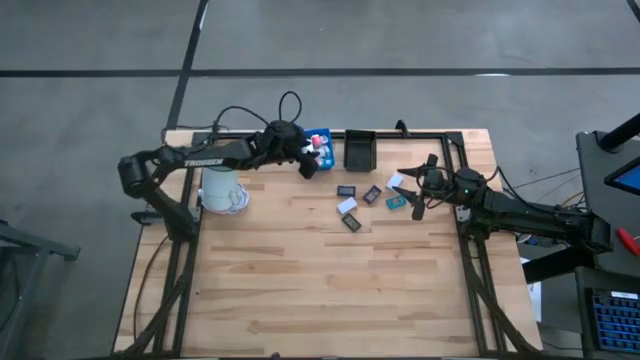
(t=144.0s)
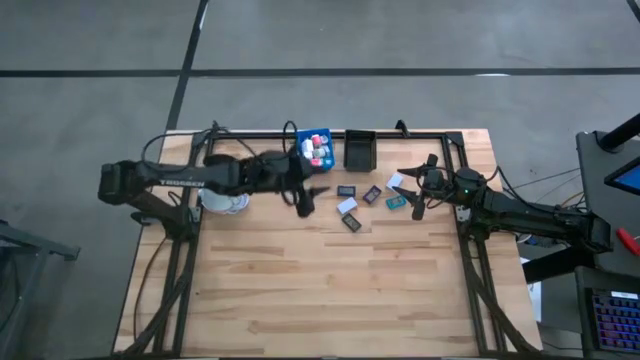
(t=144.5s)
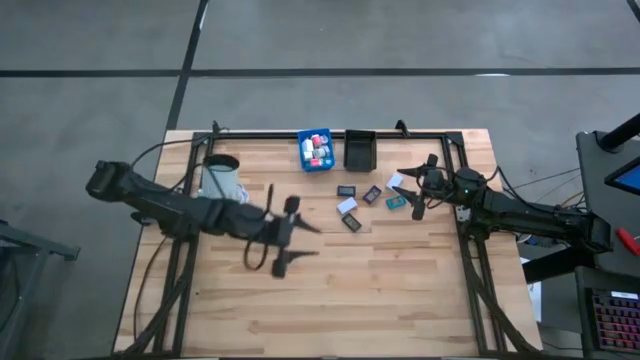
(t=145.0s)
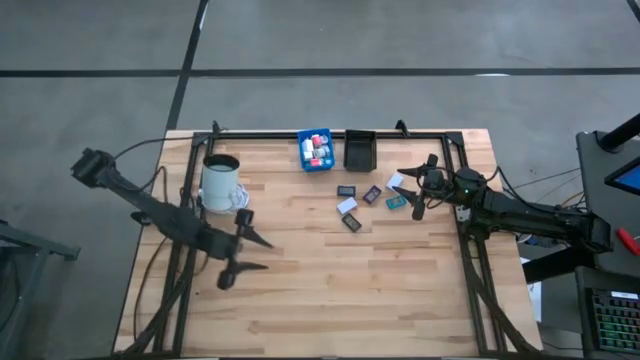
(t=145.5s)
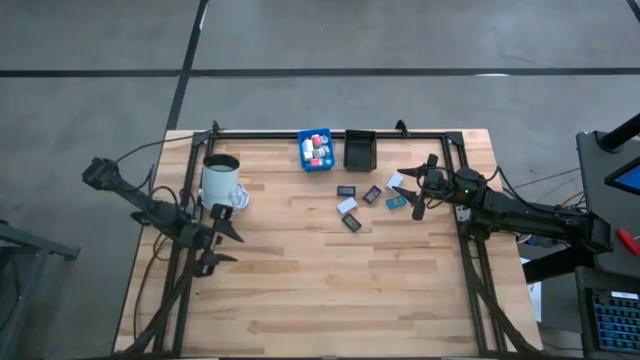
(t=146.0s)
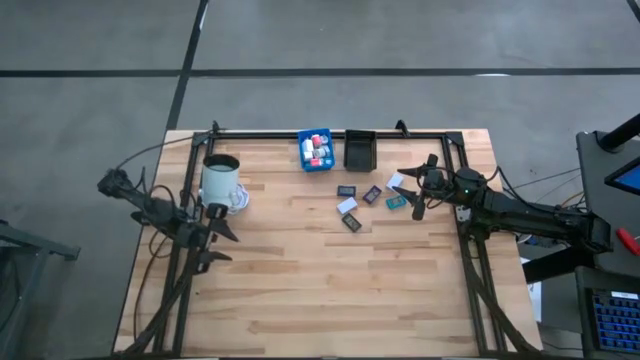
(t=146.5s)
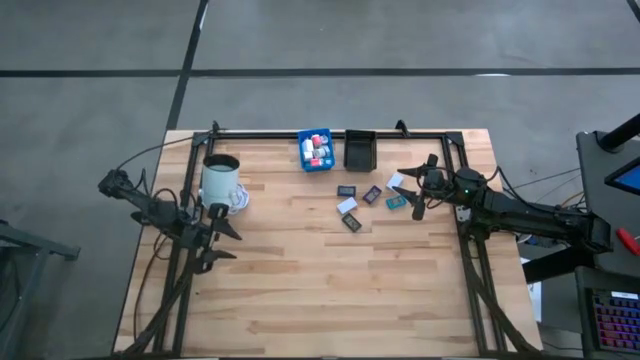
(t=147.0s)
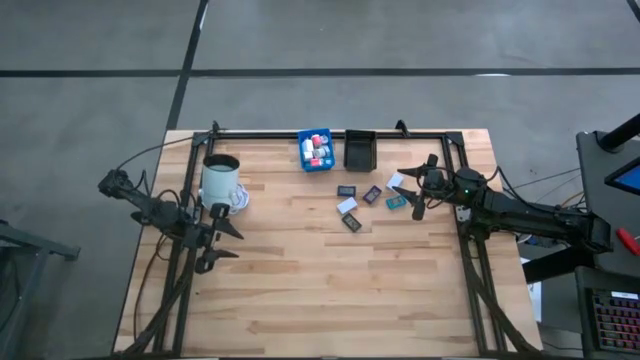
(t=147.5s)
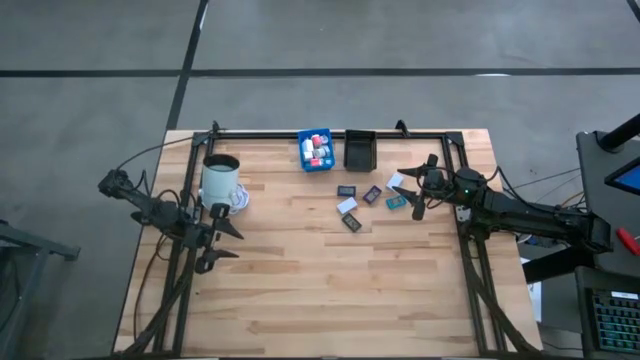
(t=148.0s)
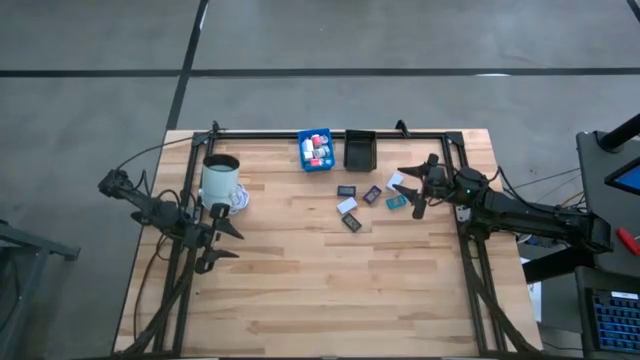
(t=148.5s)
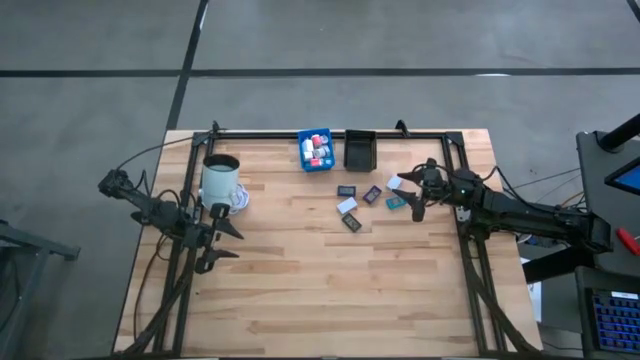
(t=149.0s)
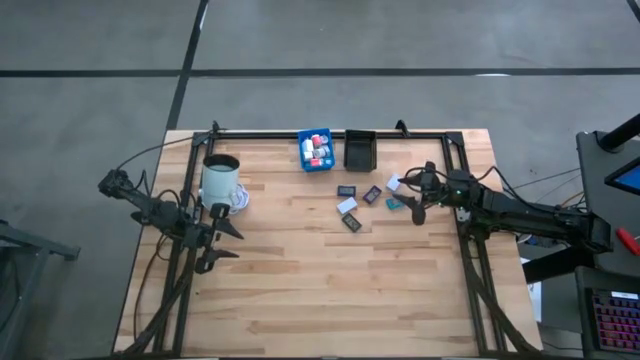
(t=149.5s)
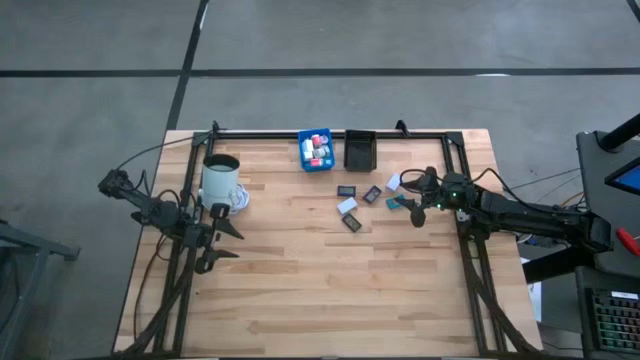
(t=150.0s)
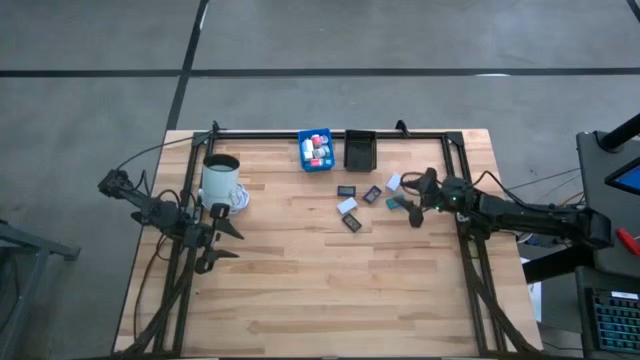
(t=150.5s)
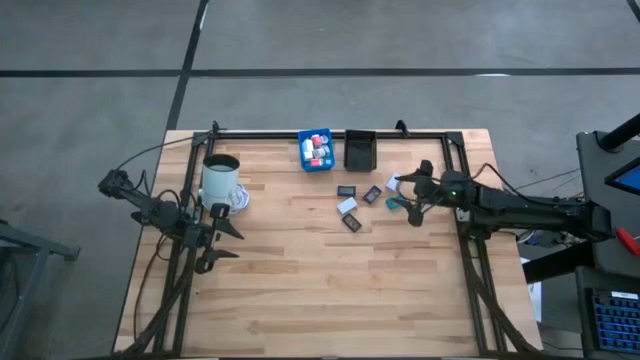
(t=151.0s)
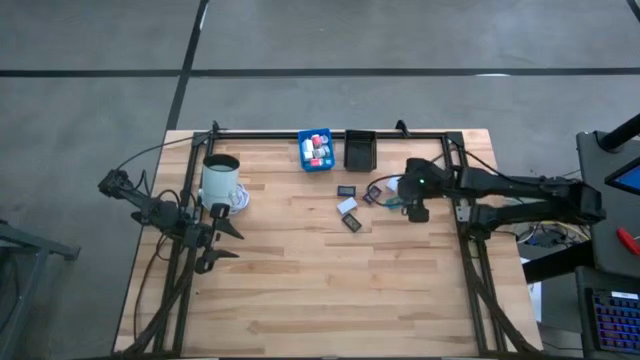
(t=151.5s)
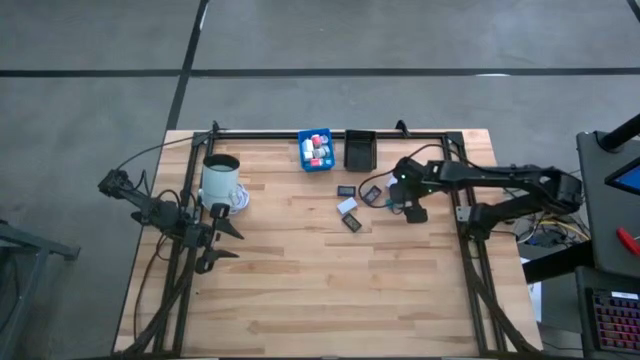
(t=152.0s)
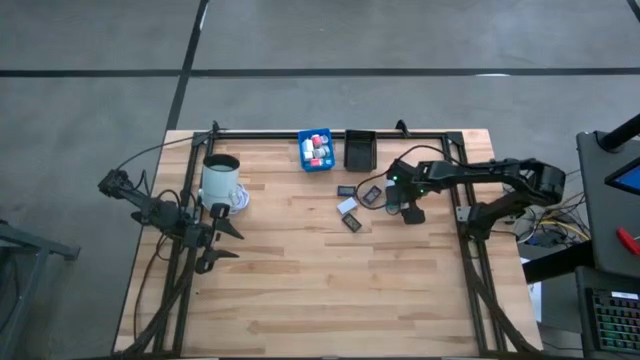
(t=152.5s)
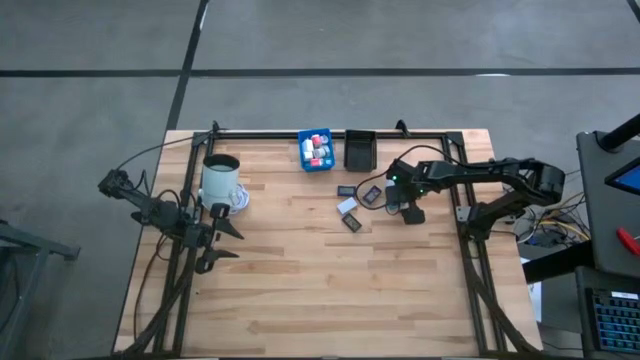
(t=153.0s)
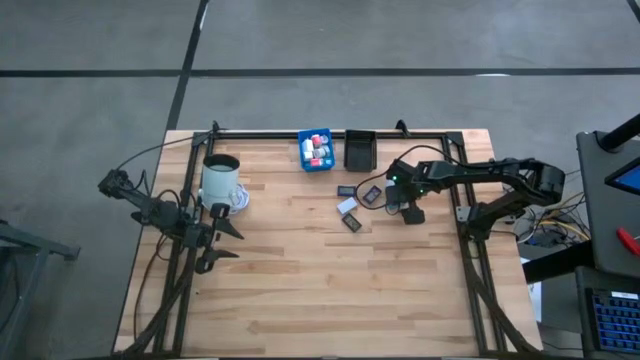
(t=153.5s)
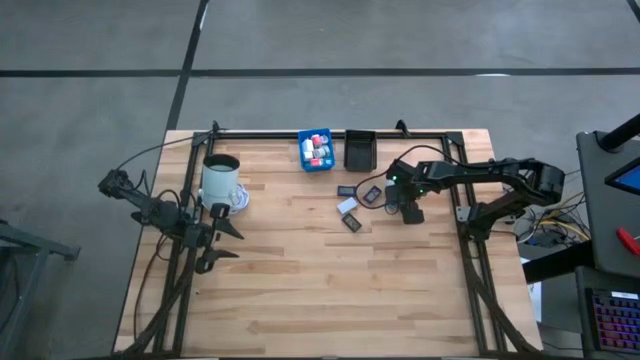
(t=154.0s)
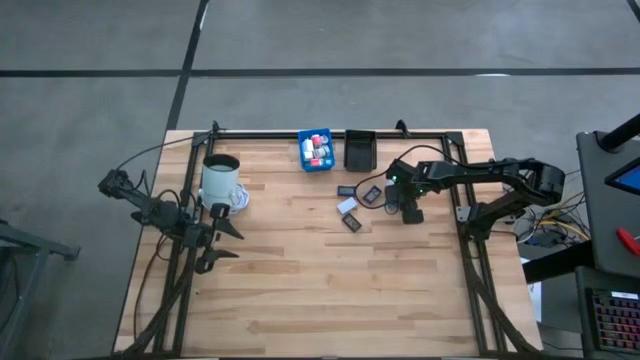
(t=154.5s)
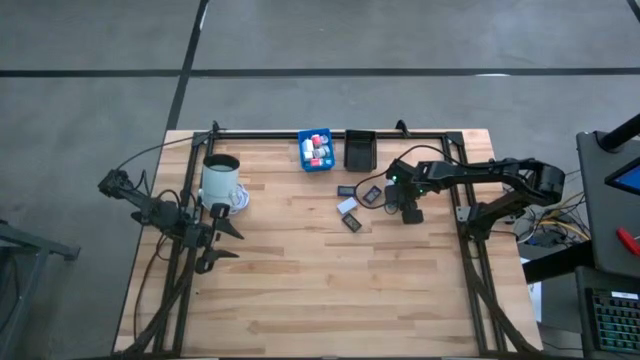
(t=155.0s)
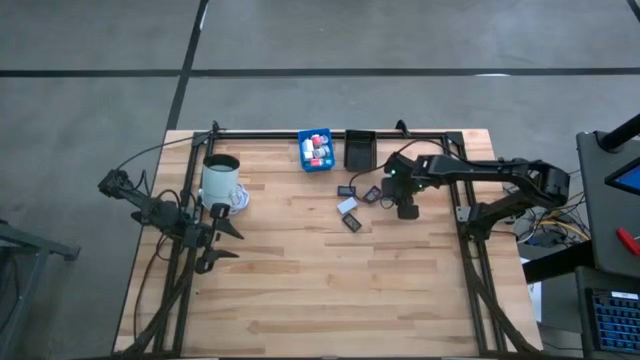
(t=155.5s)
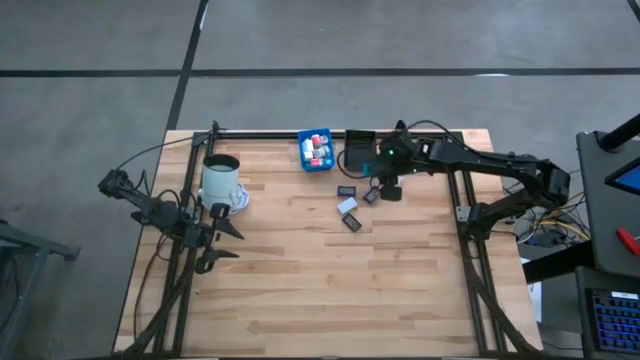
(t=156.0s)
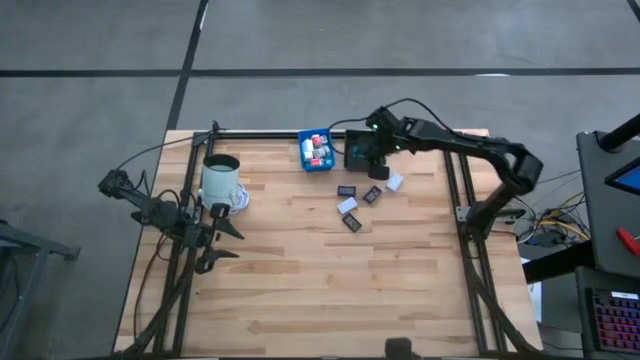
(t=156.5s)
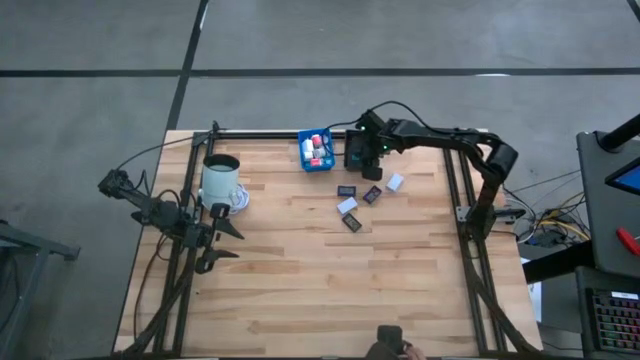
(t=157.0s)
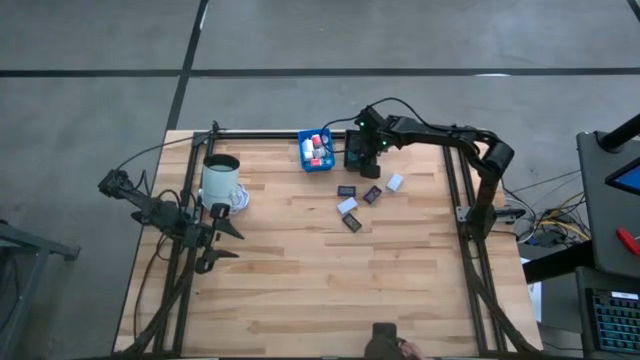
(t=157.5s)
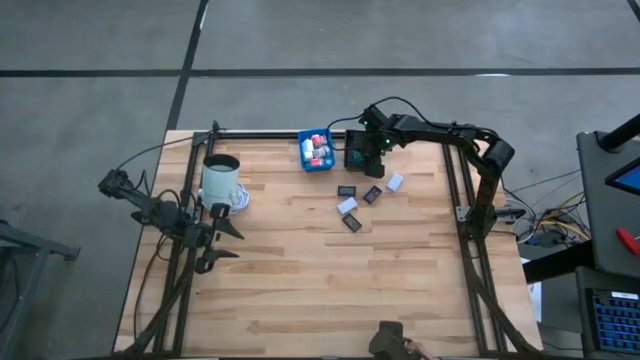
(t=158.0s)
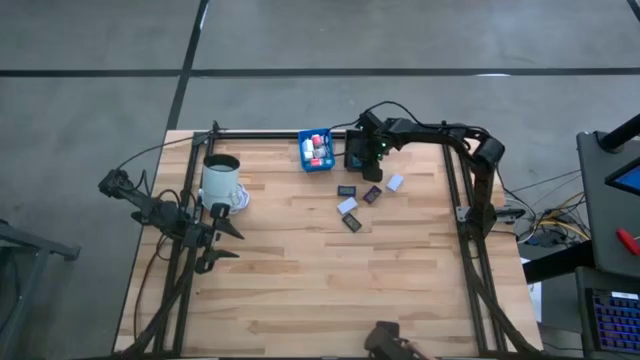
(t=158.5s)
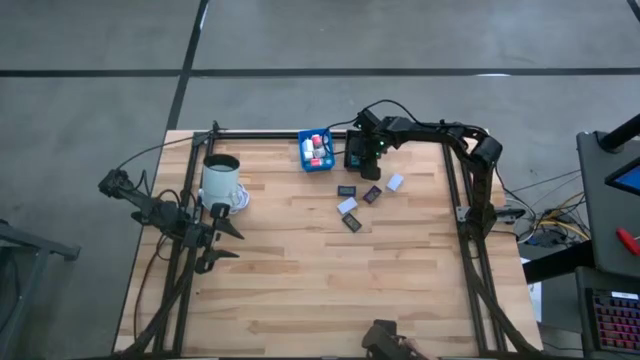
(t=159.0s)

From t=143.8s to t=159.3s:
Task: Pick & Place Office items
Put the light blue digital clock into the black basket

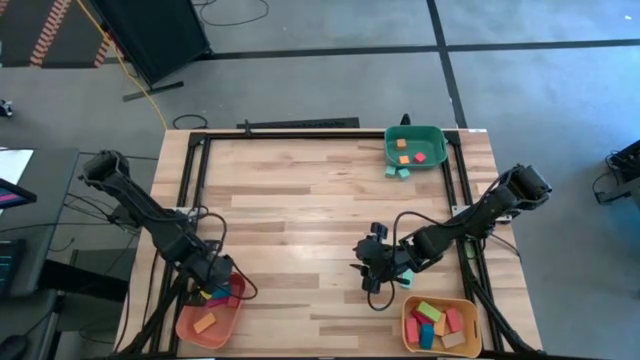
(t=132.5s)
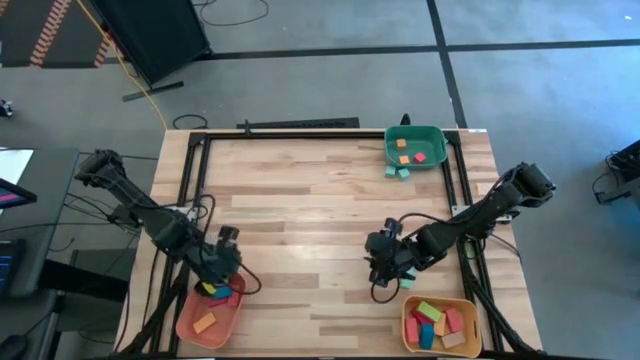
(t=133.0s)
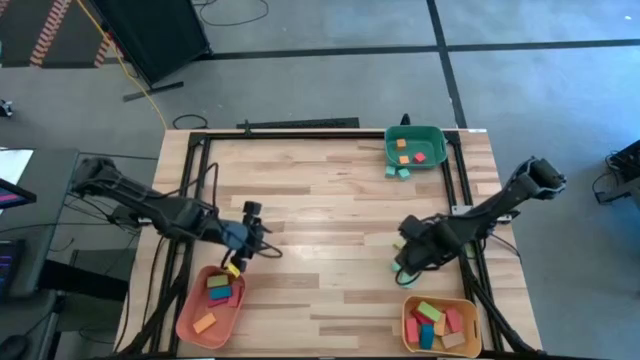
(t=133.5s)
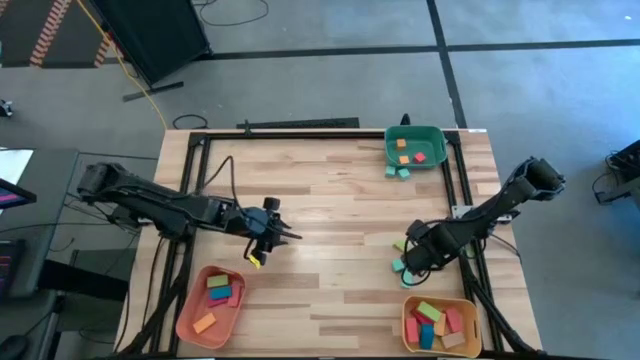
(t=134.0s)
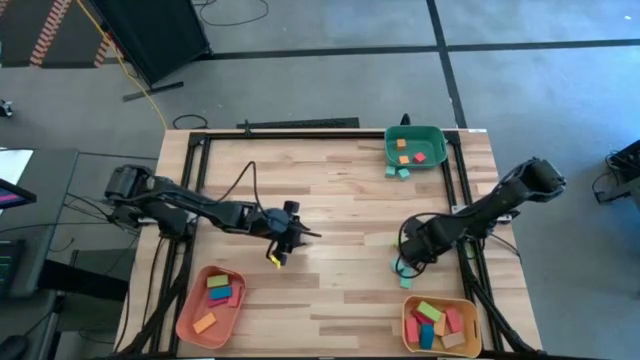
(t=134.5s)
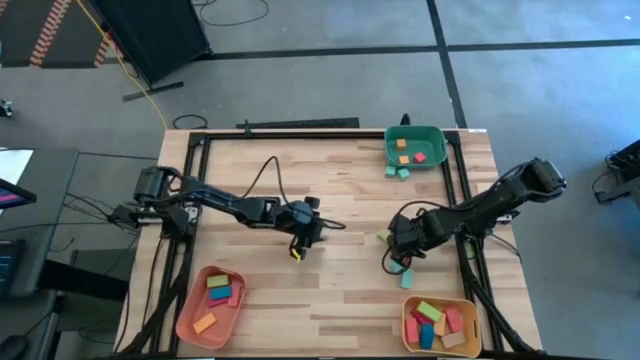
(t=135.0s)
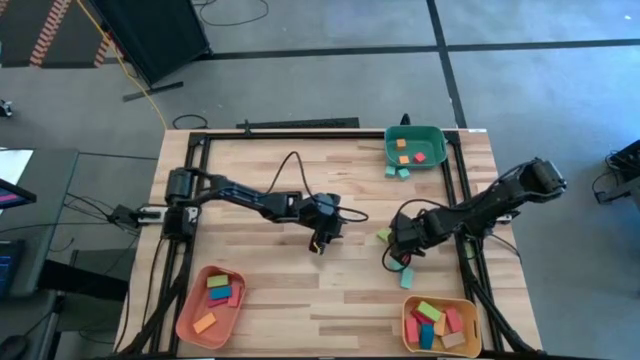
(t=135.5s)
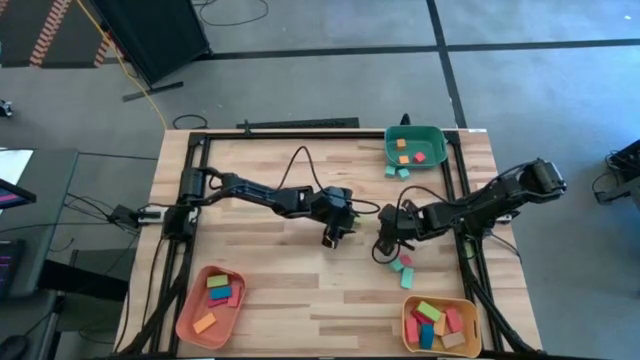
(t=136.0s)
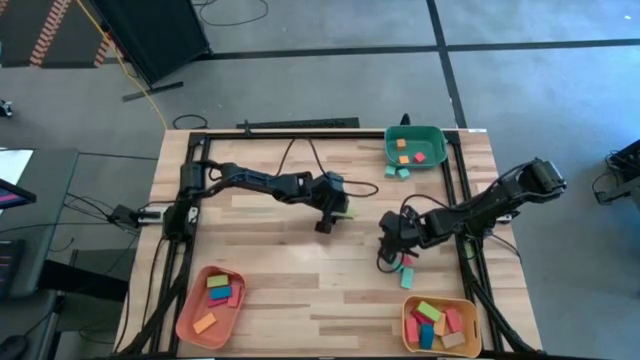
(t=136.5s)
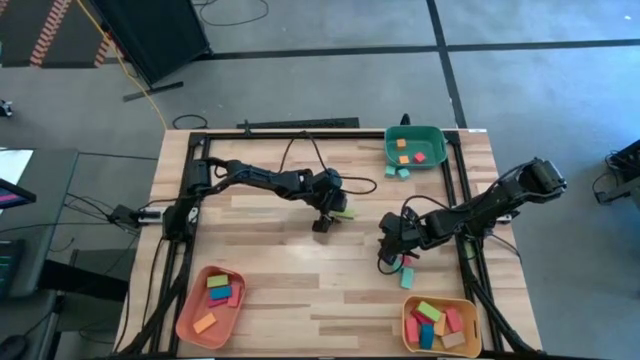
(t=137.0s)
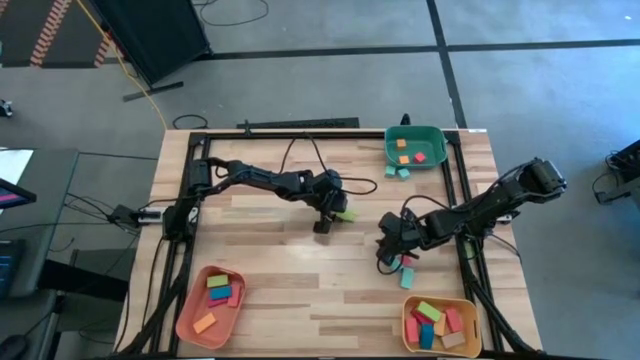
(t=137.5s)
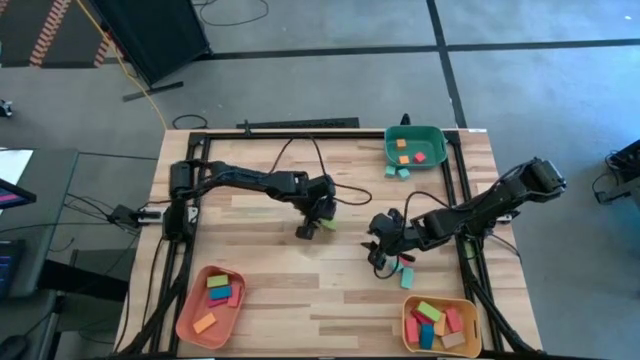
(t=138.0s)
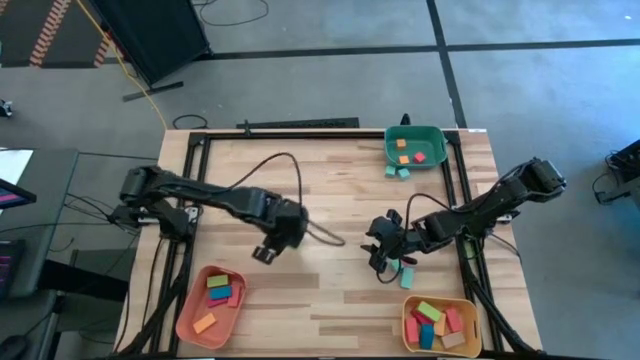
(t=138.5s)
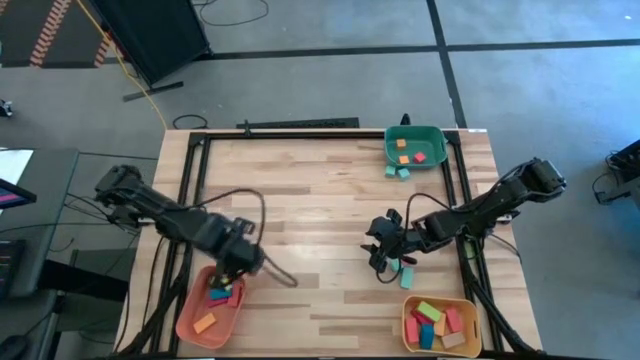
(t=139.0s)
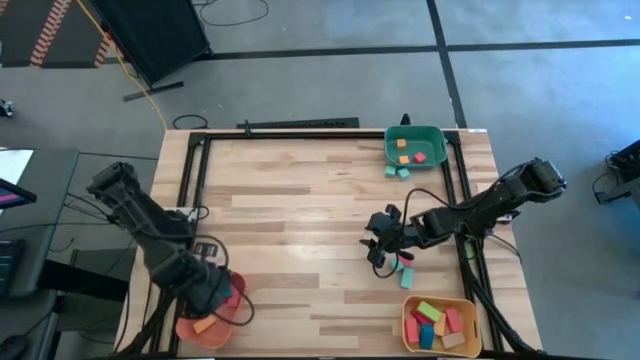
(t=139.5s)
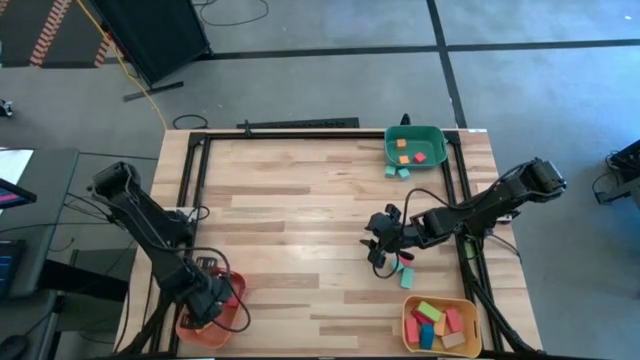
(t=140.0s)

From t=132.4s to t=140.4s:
Task: Sort blocks by size
Put the medium green rectangular block into the orange bin
